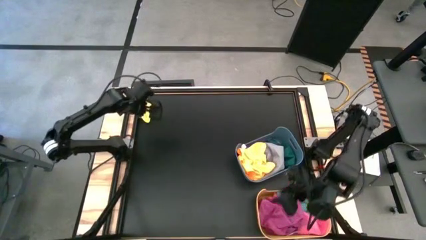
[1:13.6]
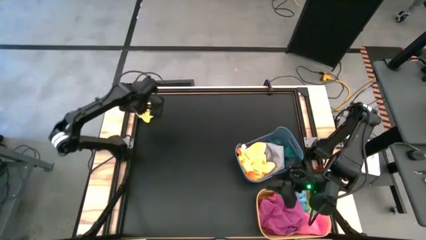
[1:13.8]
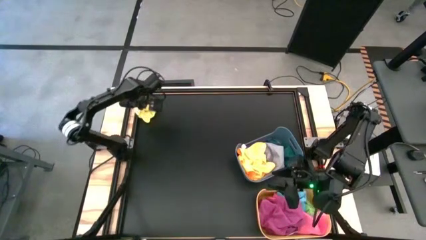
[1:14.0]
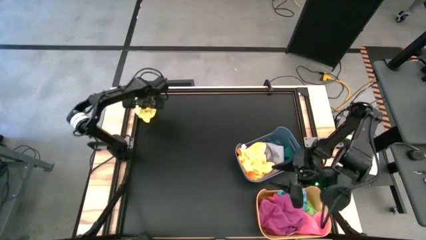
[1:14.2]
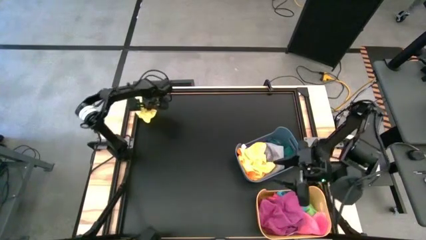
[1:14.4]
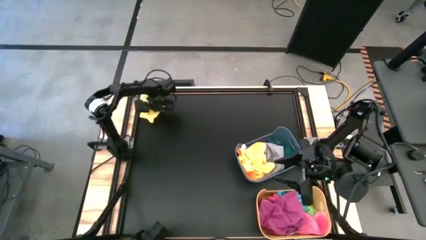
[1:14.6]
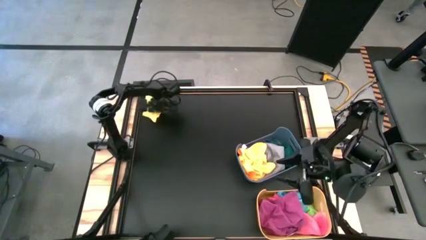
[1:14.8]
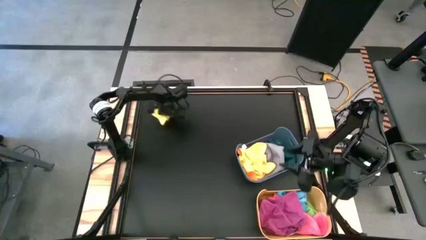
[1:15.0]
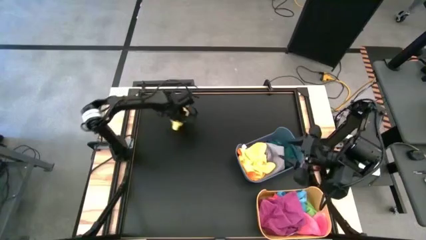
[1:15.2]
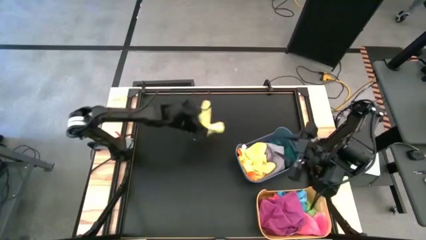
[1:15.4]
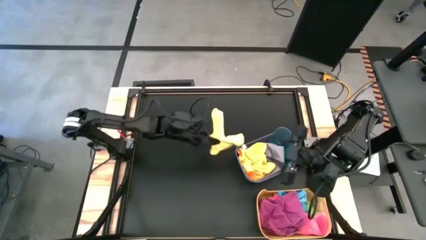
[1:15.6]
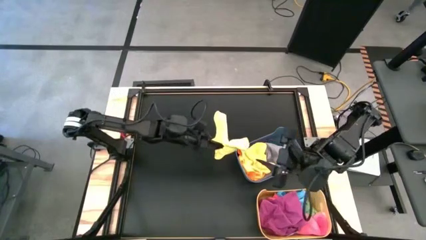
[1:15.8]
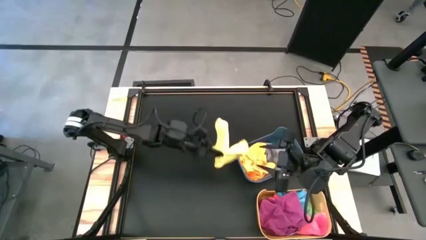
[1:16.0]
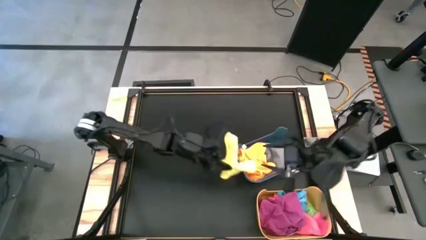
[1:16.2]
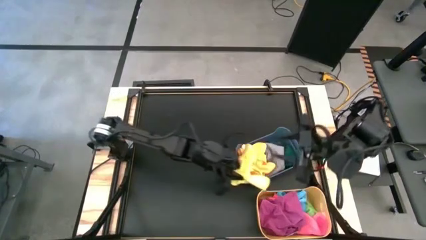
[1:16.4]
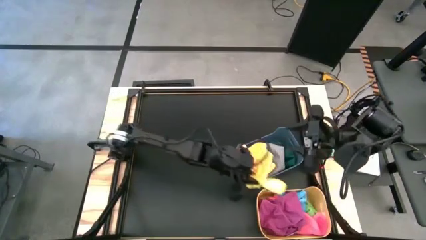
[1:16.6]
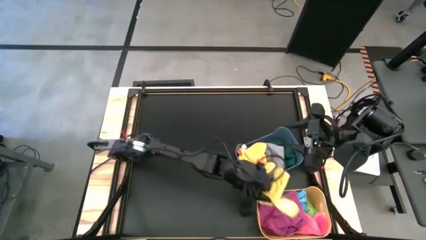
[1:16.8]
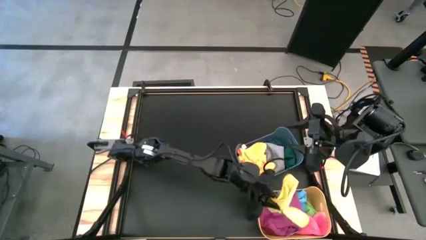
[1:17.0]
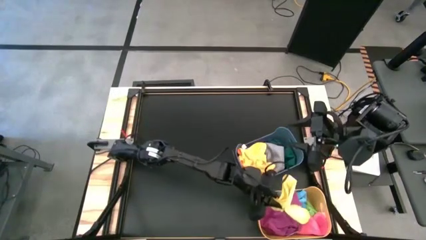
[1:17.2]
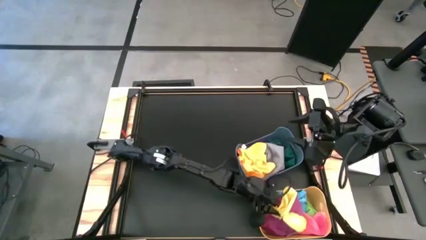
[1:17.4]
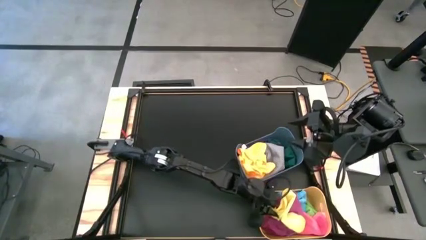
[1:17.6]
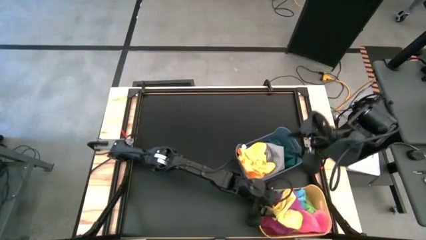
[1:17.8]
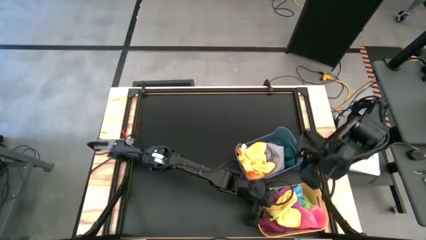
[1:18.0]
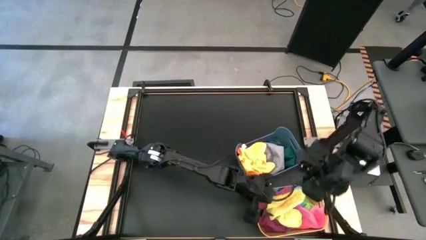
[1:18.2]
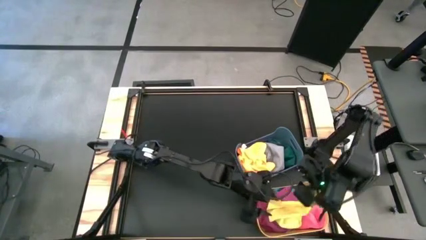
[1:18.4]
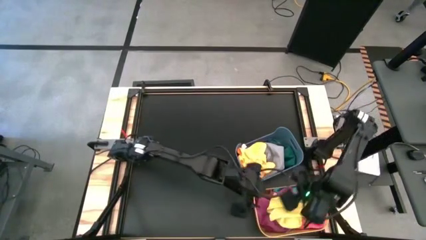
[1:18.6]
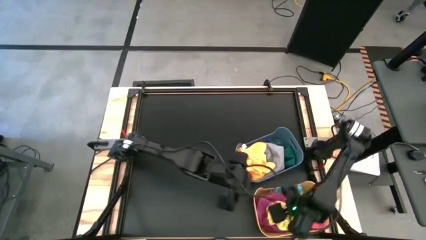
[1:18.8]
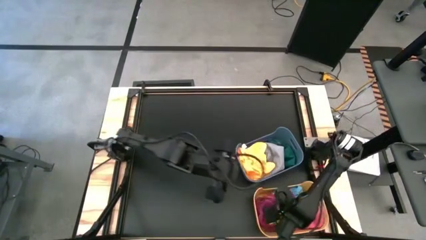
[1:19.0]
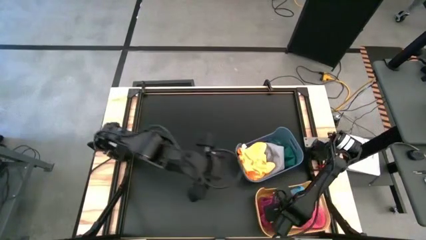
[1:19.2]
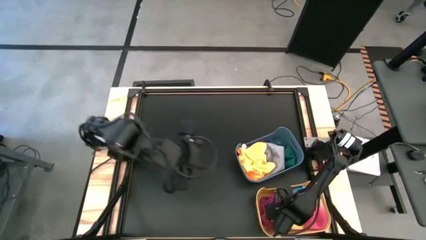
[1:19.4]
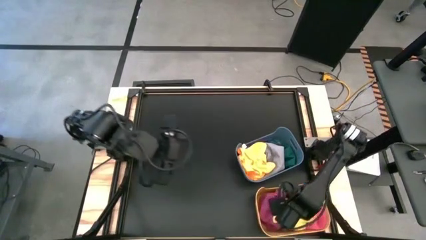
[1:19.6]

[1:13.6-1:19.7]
Task: Sort towels by color in basket
Put the yellow towel into the yellow bin

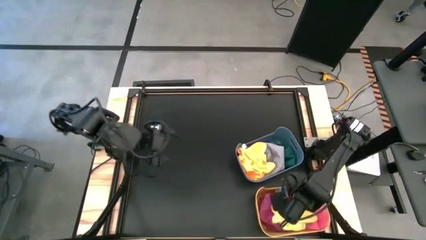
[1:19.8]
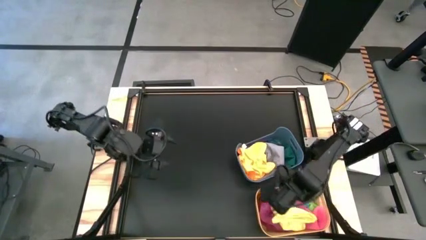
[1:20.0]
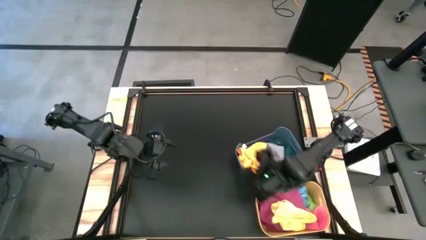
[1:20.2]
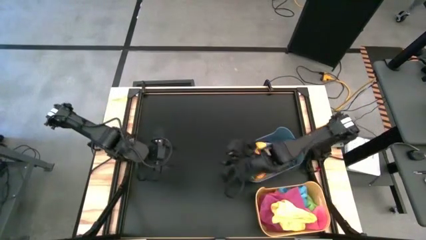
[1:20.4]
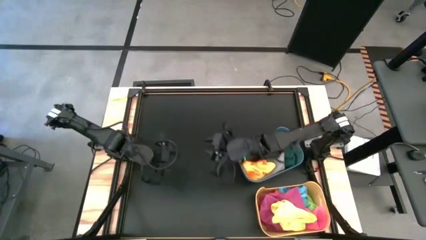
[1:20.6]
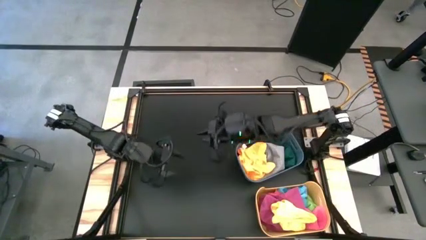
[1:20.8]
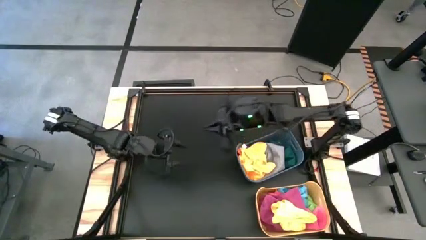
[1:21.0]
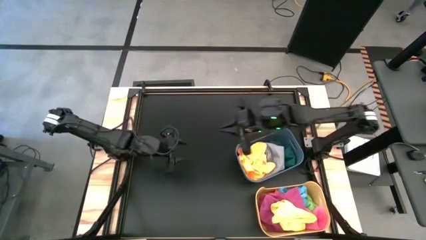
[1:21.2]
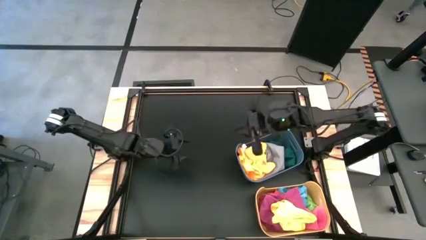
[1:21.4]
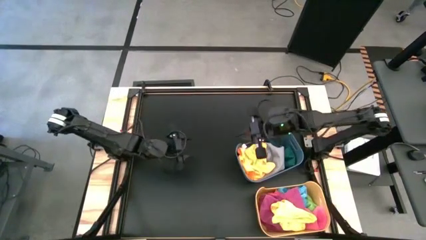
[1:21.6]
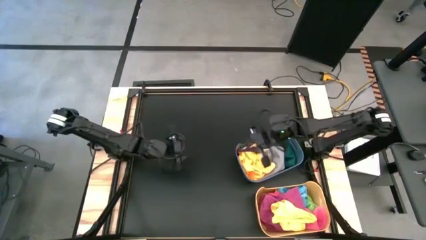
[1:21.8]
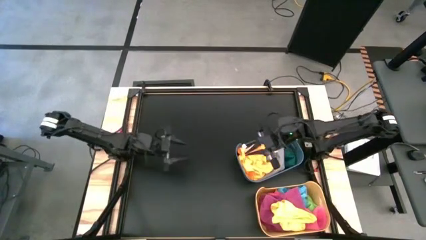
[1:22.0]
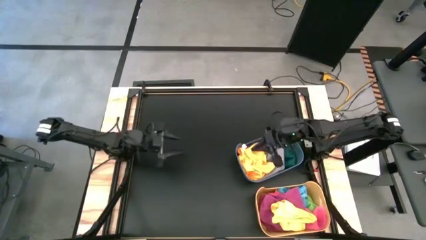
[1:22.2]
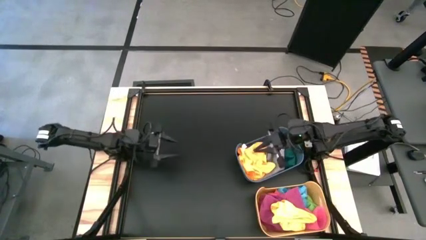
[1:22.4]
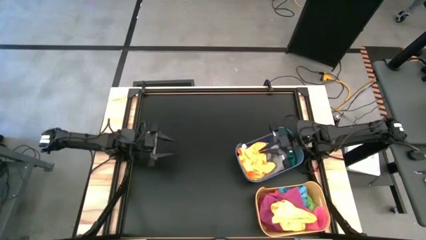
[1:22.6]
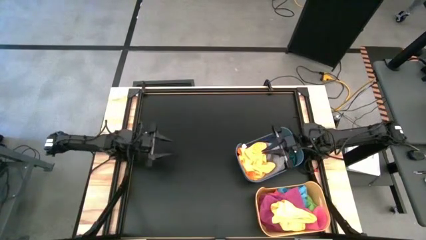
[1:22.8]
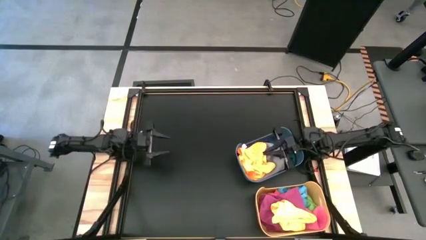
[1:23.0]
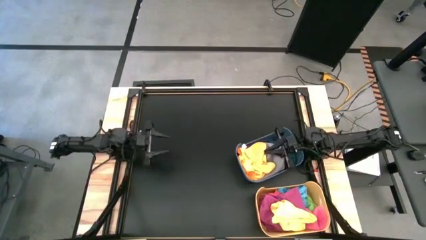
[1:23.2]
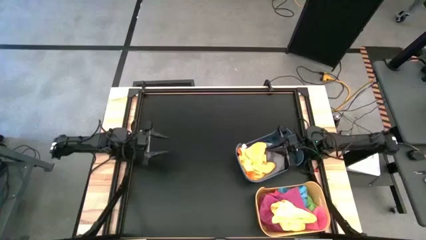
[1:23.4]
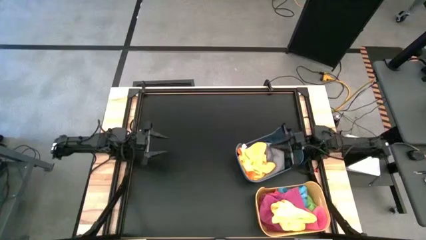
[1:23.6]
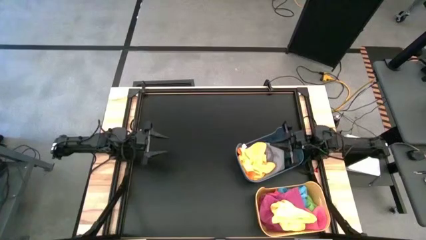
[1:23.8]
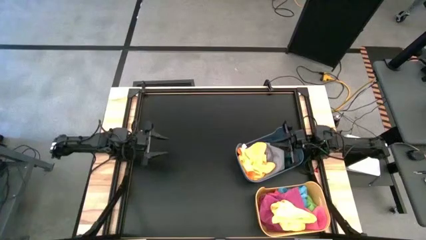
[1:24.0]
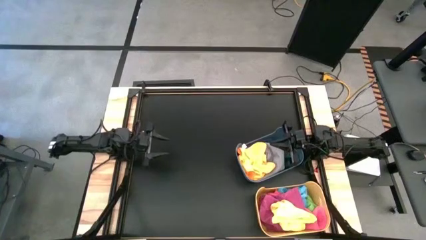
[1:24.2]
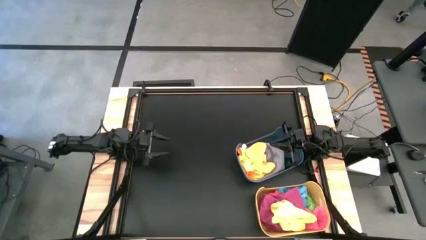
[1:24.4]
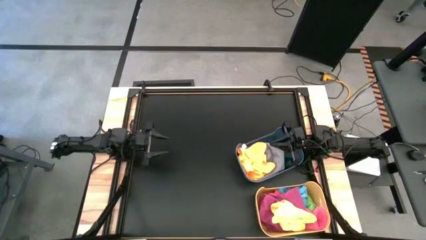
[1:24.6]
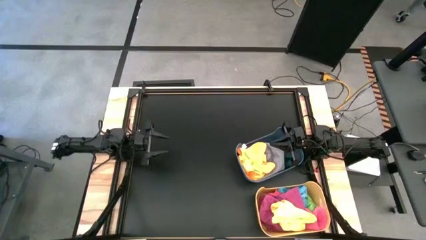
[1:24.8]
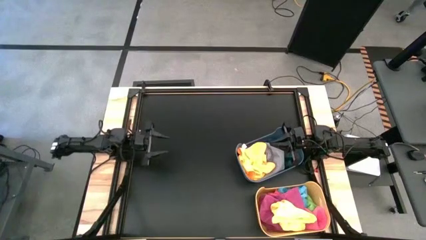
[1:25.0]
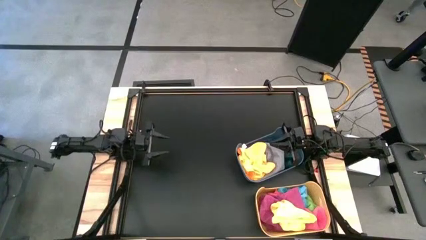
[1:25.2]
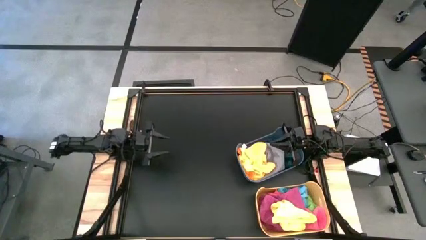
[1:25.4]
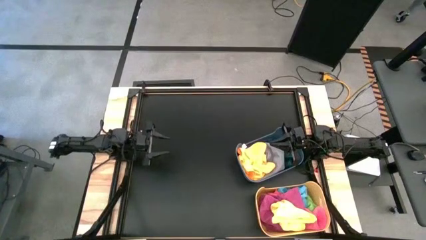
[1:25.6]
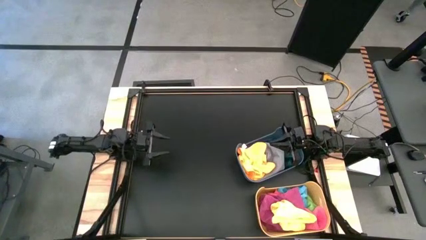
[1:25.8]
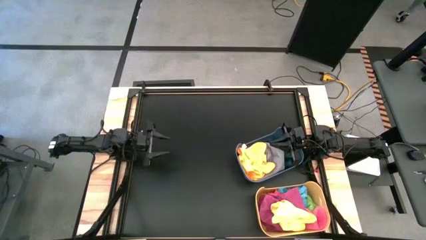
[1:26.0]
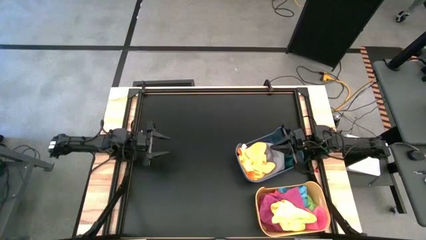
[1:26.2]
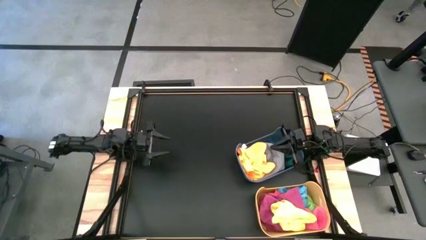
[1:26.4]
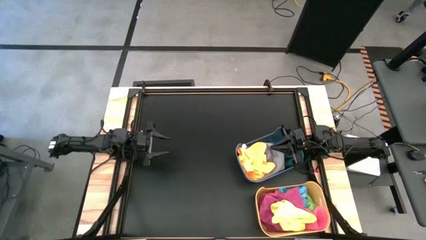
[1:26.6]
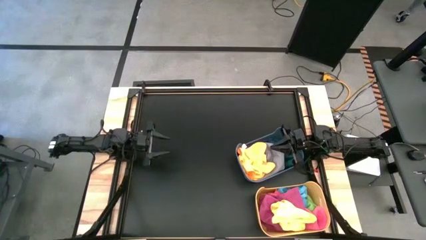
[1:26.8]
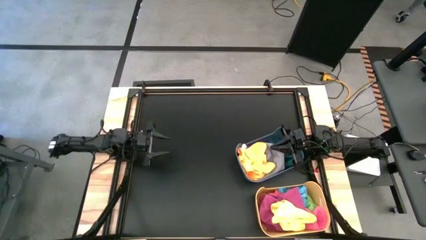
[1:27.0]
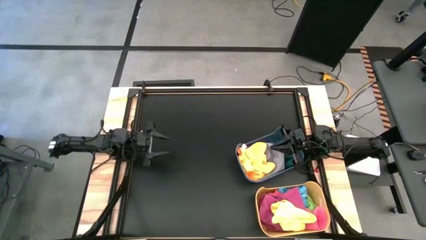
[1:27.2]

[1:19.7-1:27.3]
Return to Home Position

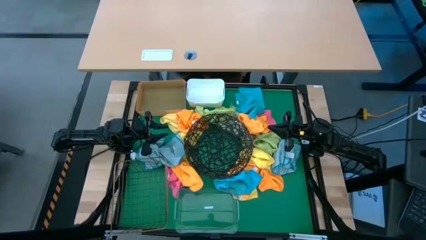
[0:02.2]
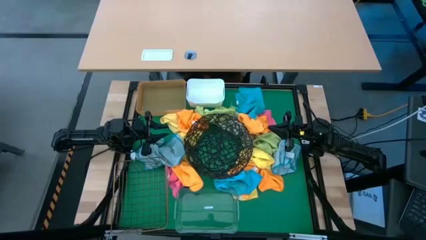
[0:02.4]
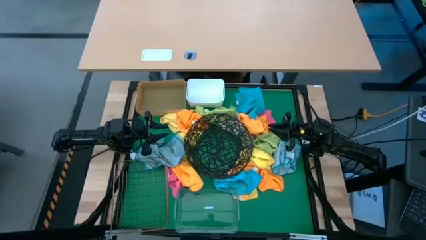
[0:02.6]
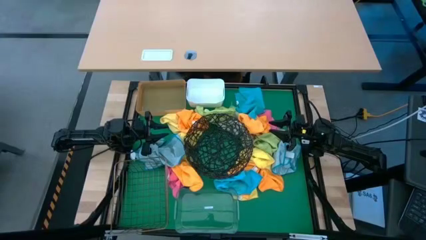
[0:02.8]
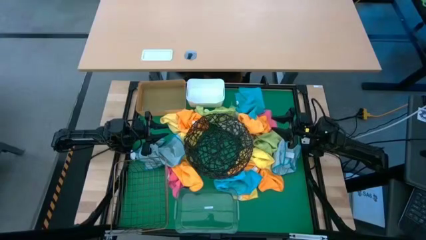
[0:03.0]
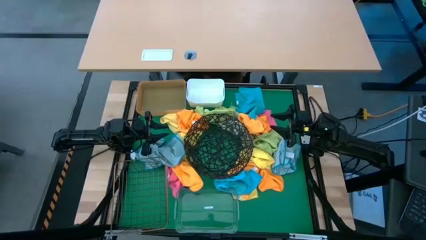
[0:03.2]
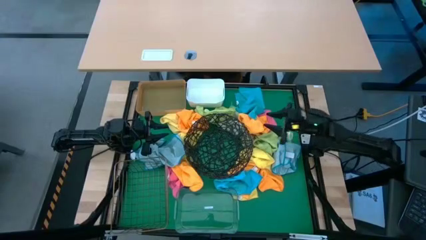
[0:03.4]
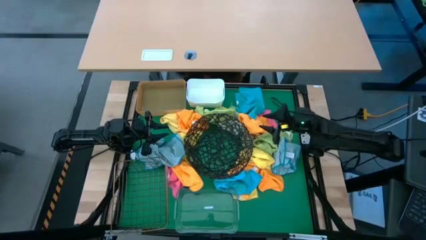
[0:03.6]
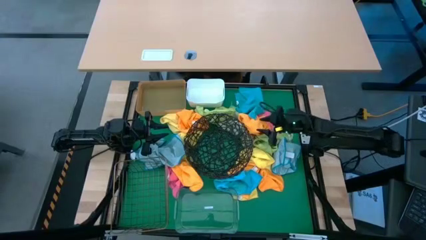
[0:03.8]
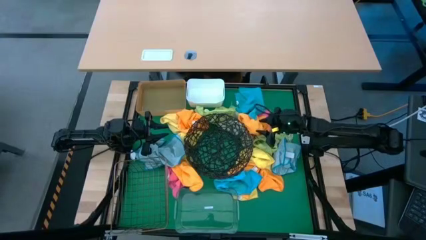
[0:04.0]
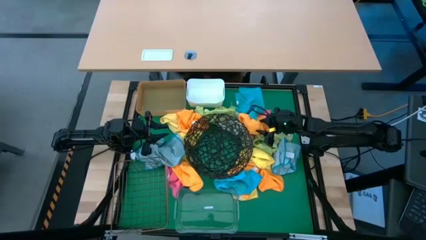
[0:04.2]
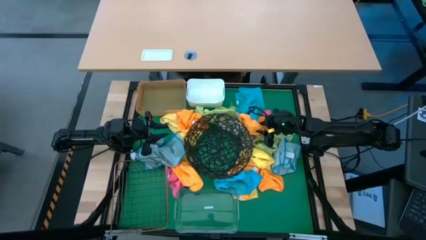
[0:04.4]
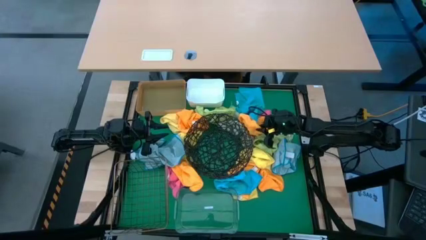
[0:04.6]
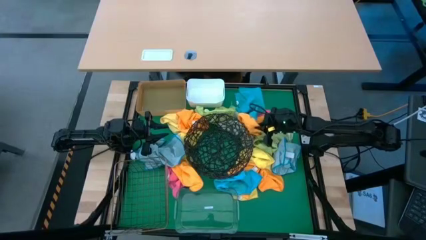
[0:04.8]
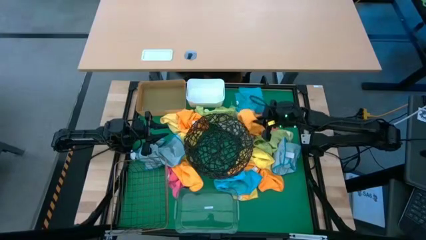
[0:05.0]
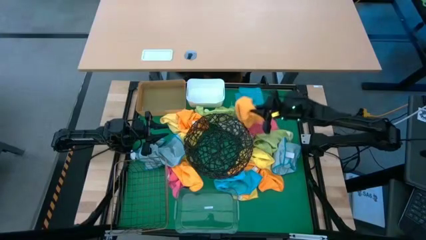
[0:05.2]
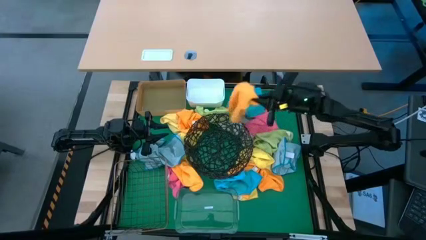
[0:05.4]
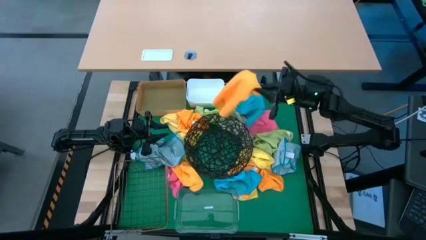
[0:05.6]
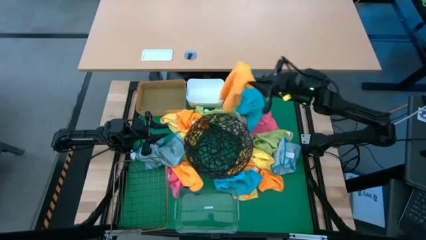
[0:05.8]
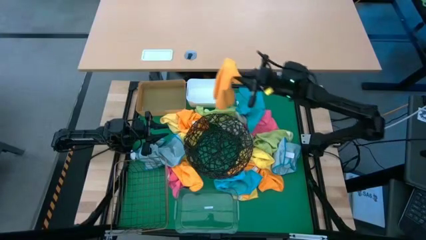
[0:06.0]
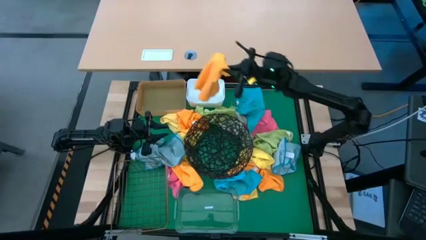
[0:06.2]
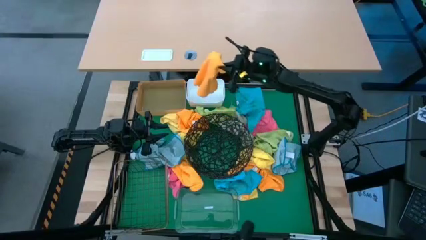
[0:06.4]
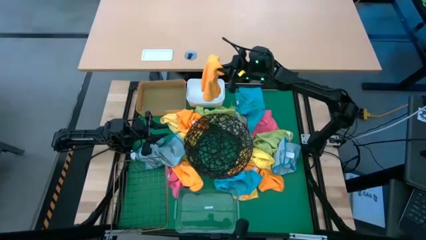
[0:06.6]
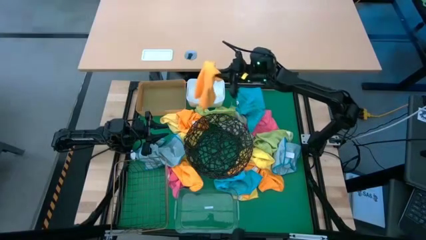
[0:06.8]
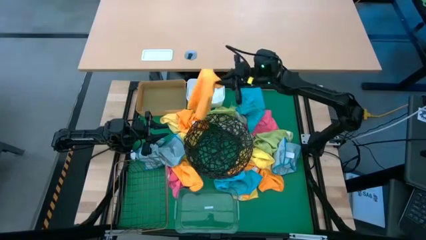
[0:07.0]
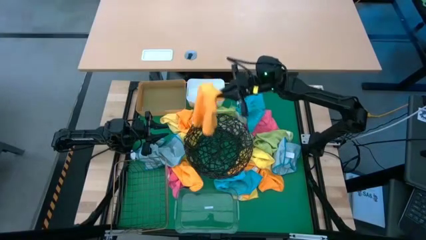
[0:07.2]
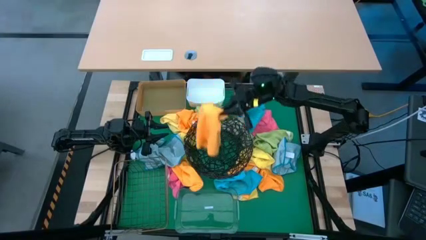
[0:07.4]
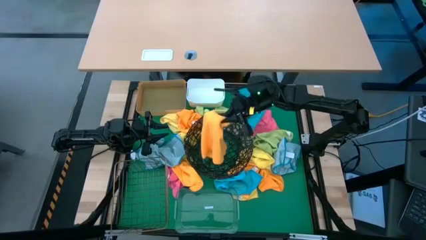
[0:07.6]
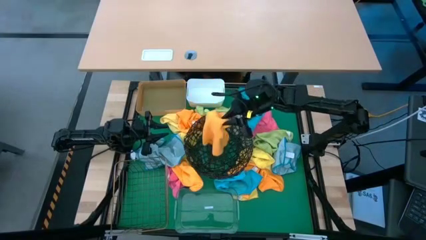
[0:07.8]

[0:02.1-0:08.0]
Task: Sort microfiber towel by color & place in baskets
Put the orange towel into the black basket
